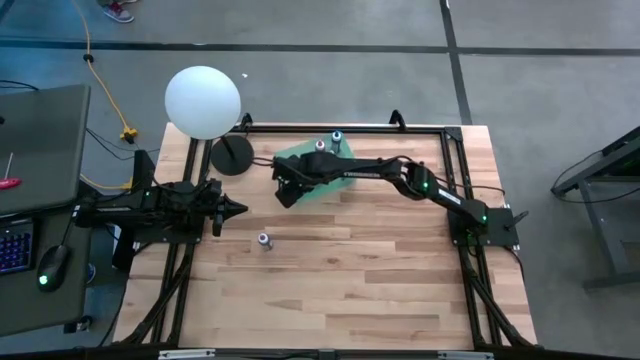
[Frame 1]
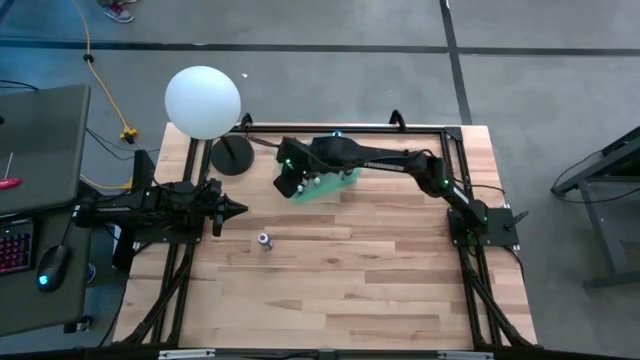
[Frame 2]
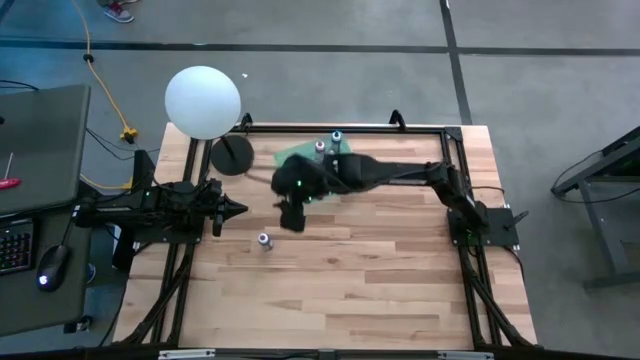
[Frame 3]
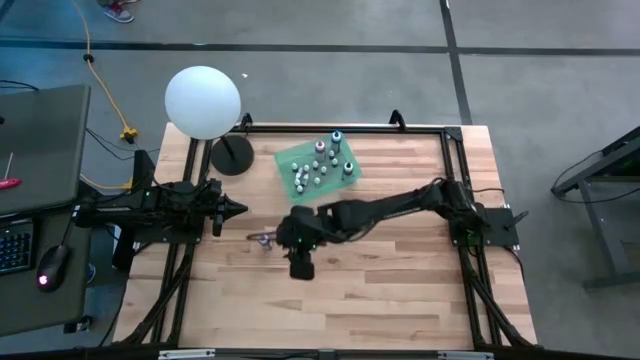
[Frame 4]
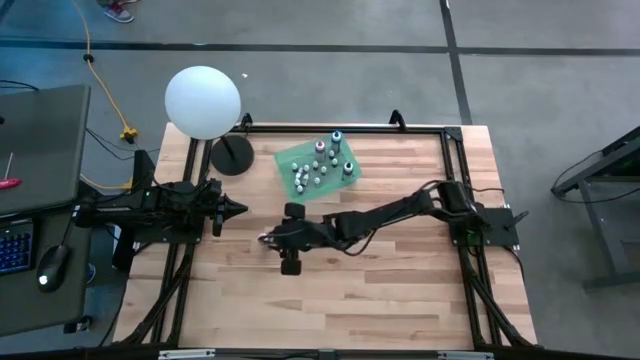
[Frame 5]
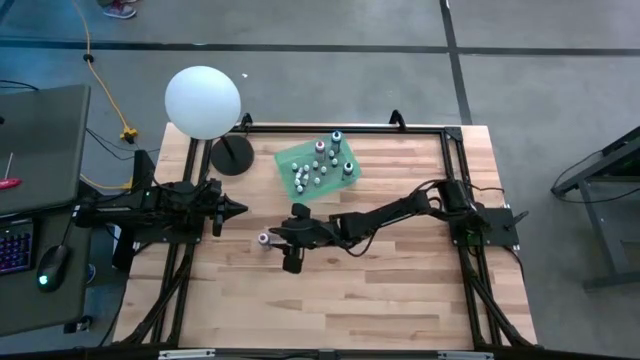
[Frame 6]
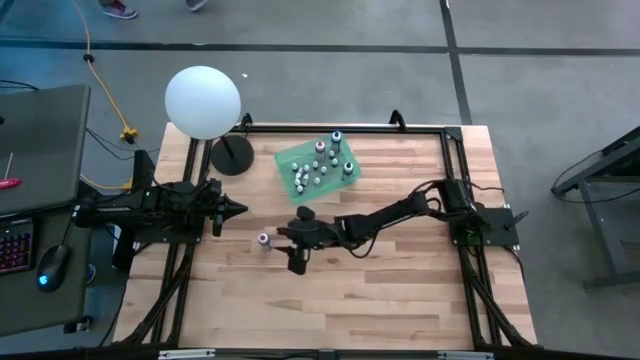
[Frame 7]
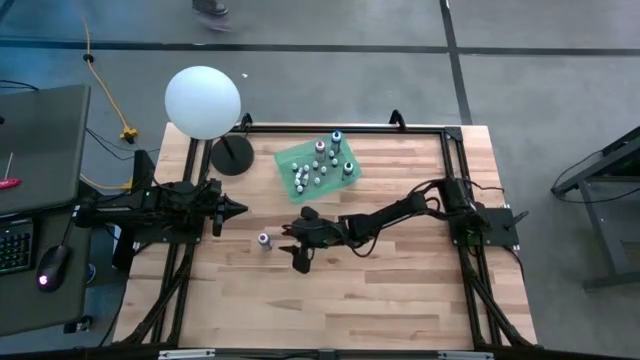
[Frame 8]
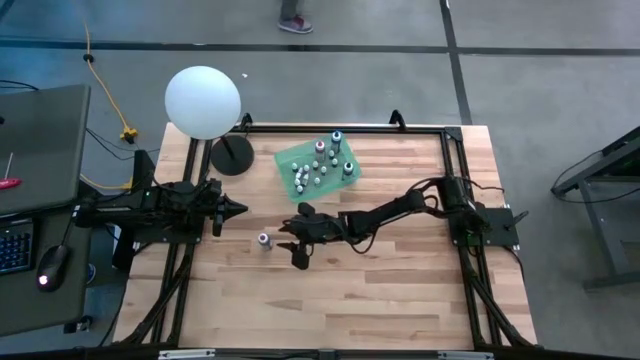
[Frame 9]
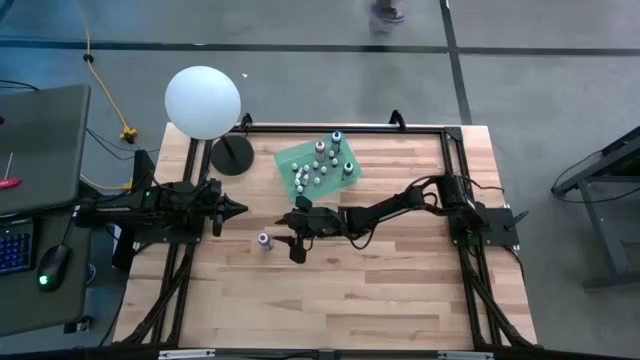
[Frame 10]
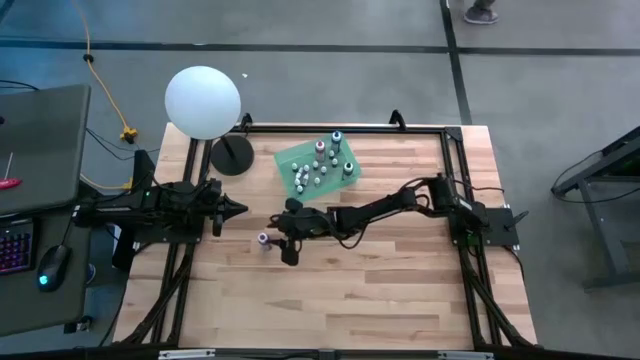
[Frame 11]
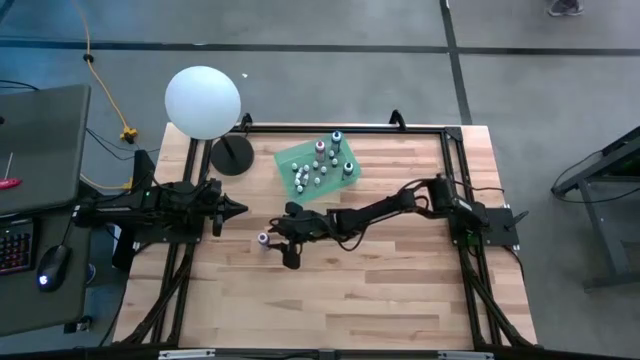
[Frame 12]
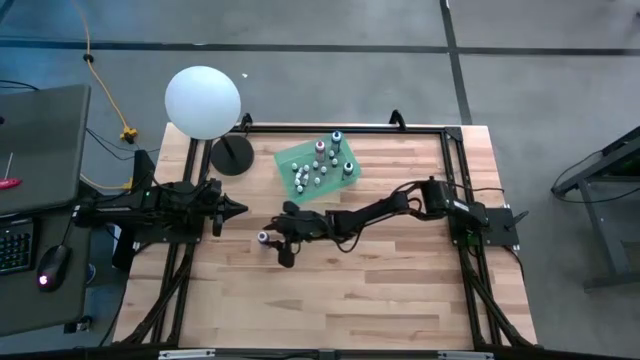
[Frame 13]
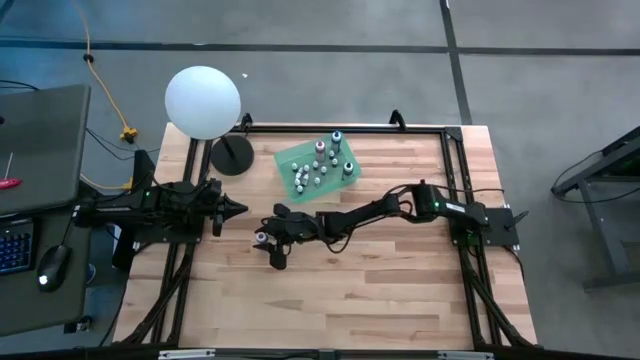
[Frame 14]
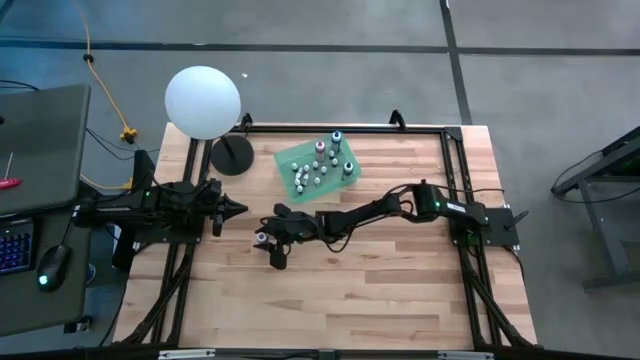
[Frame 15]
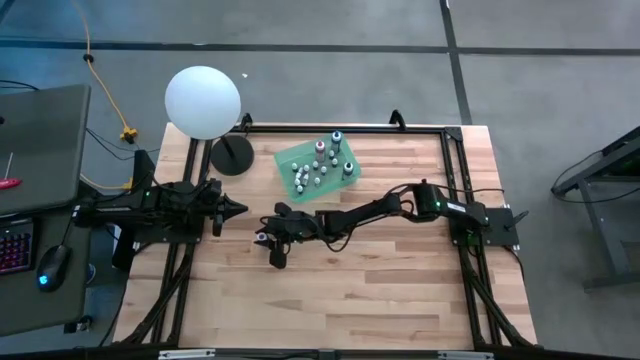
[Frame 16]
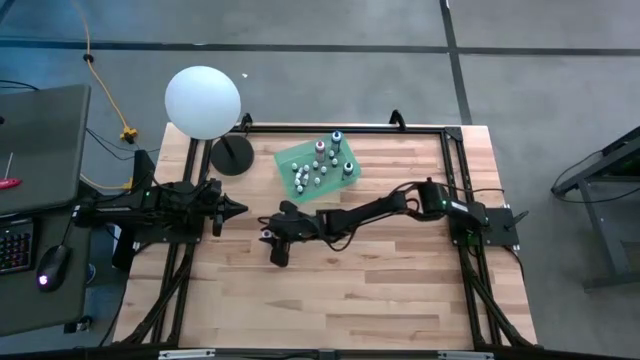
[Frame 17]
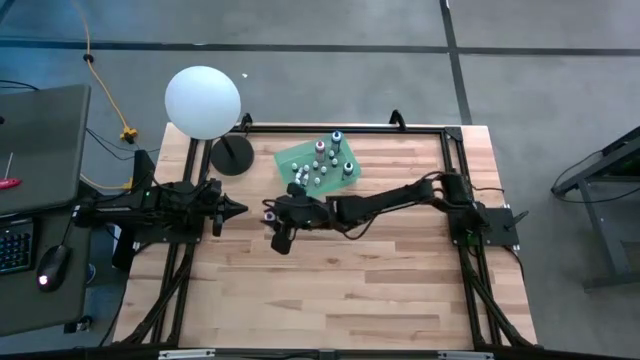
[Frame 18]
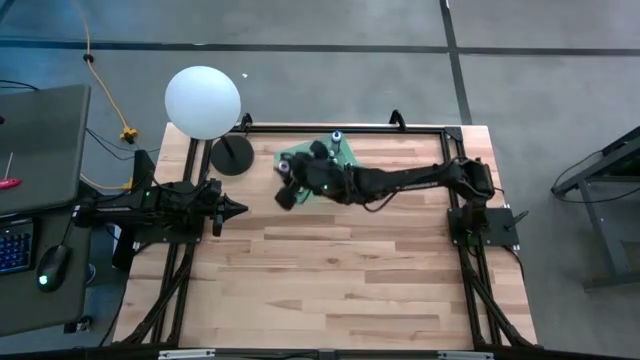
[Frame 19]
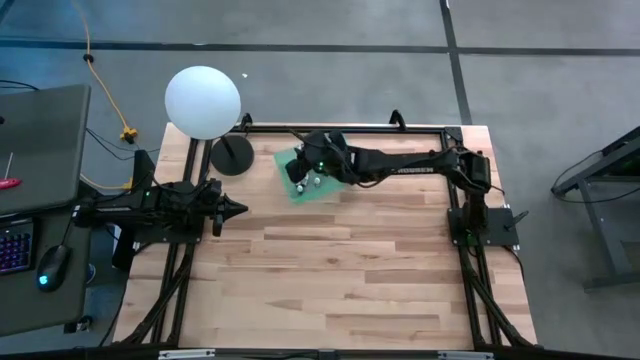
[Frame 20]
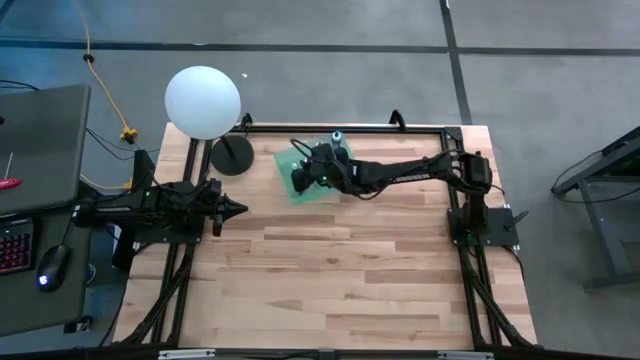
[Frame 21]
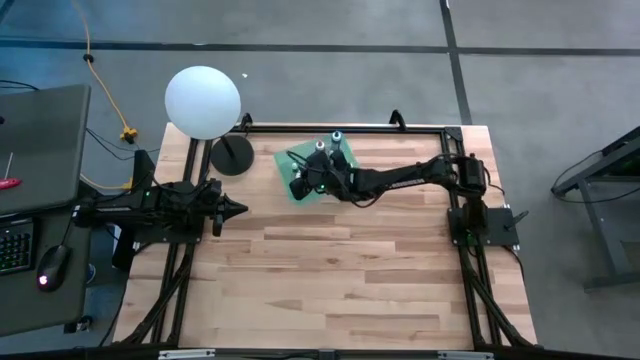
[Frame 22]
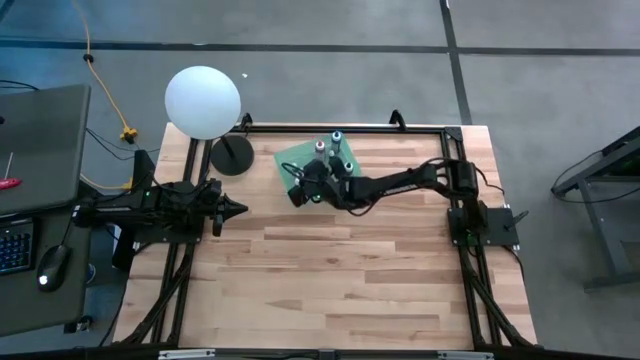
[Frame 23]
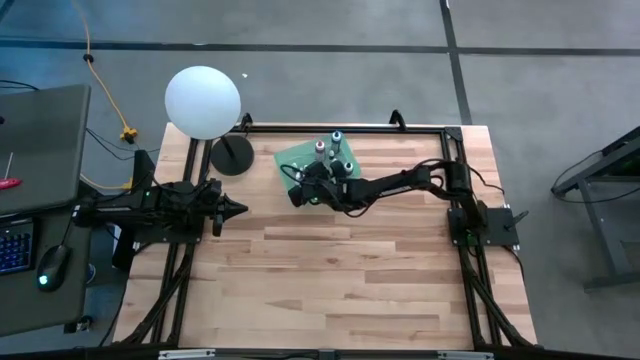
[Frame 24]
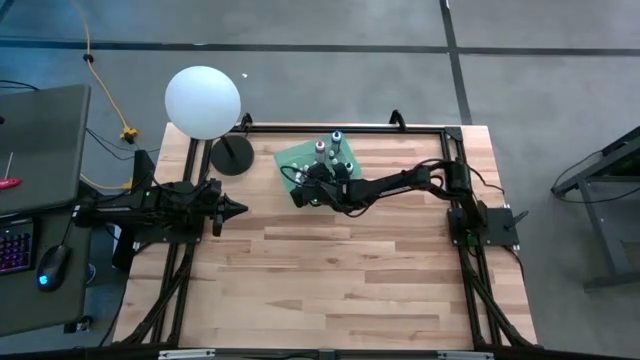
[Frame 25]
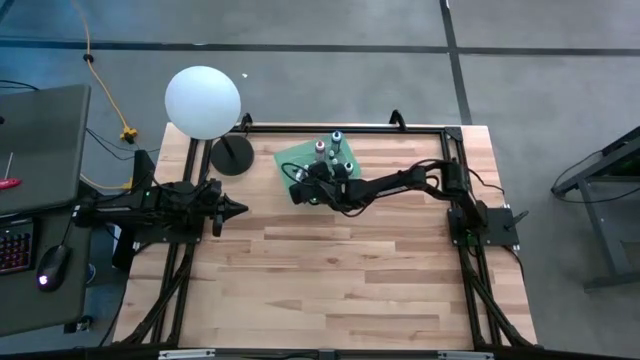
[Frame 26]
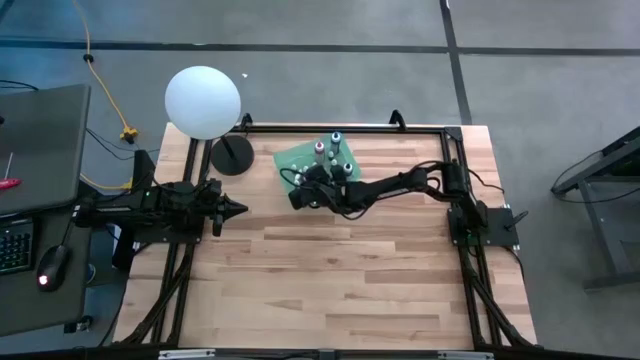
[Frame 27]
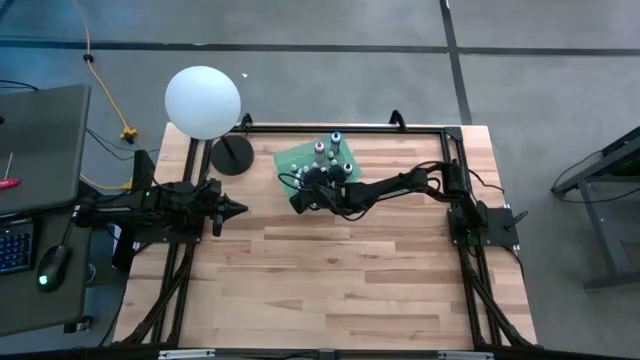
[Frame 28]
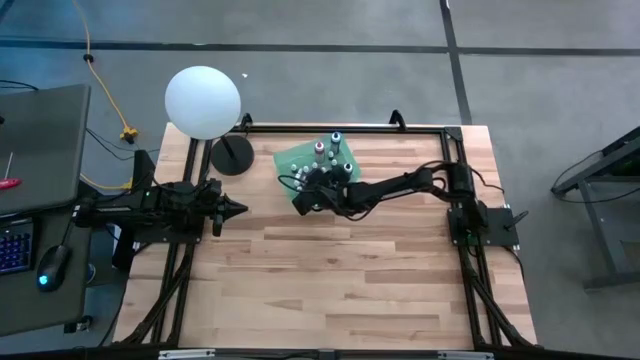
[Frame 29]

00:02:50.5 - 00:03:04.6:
Task: Pick & Place food coloring
Put the large purple dye bottles in the green bin

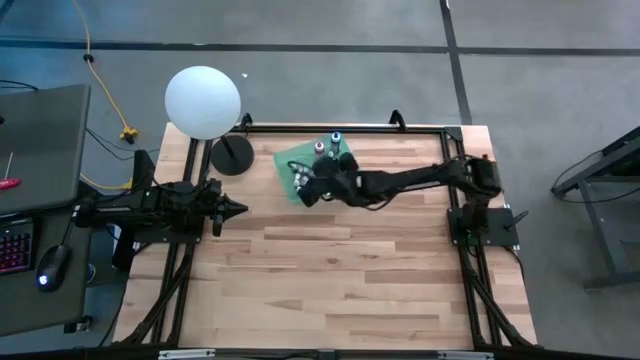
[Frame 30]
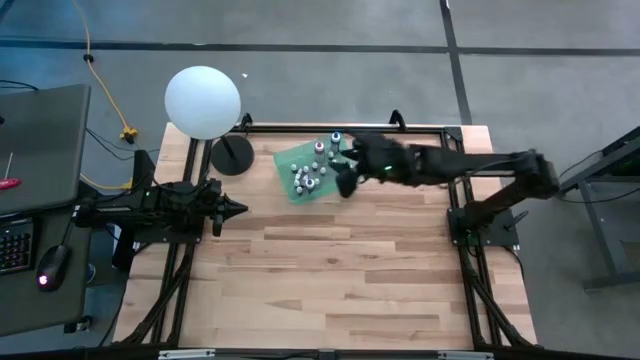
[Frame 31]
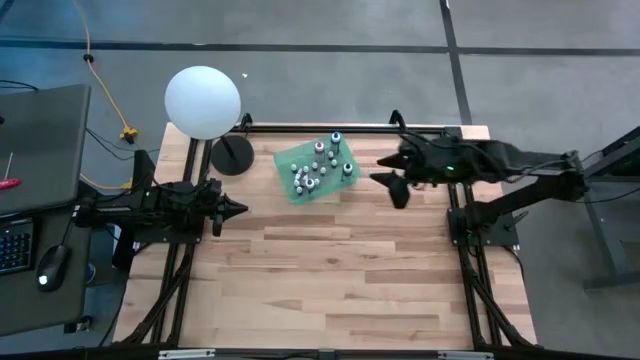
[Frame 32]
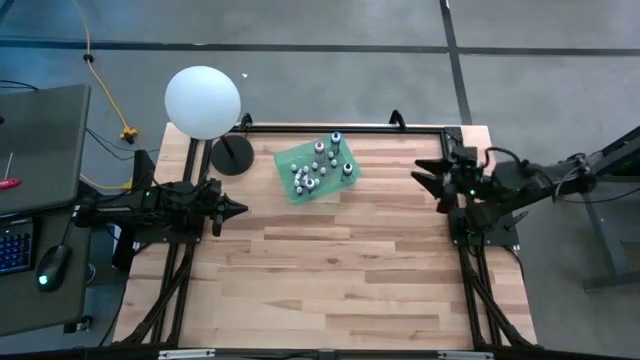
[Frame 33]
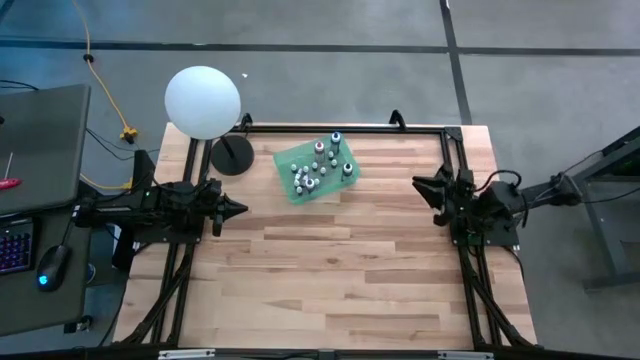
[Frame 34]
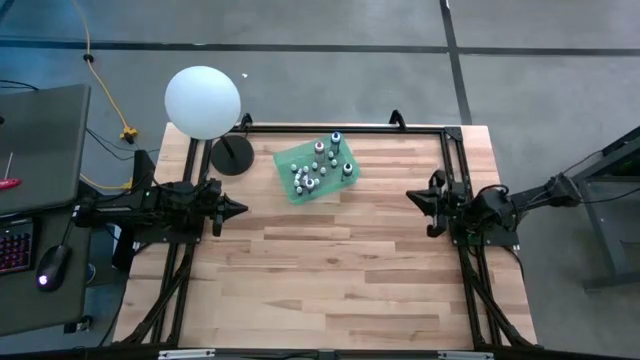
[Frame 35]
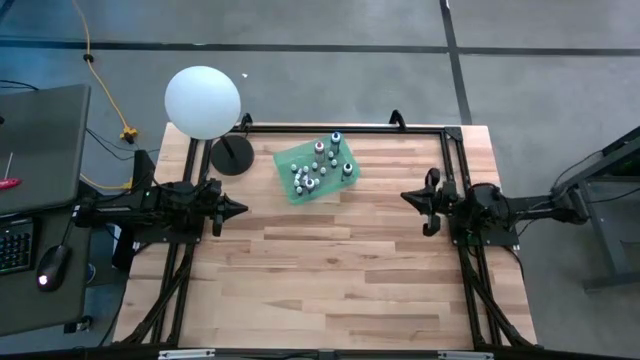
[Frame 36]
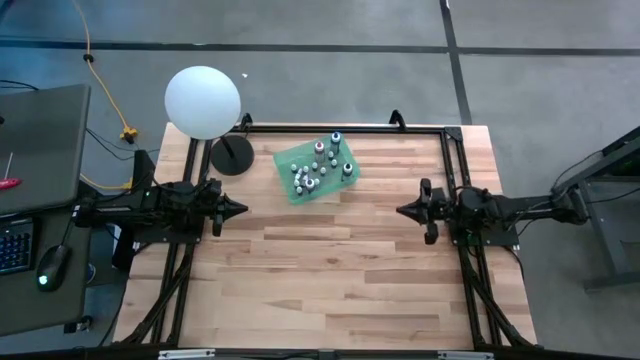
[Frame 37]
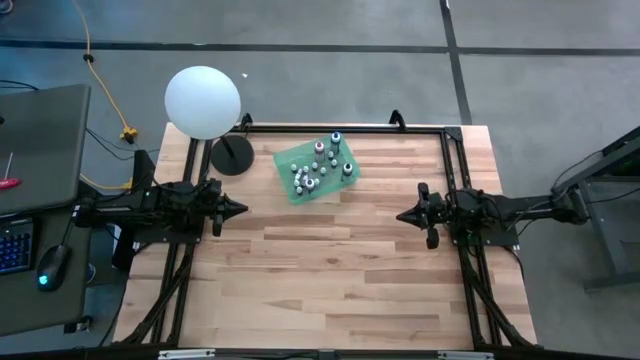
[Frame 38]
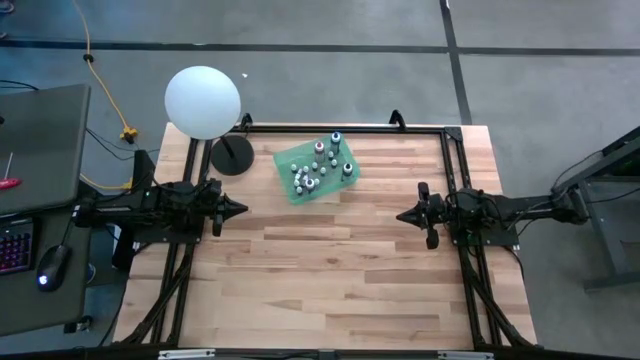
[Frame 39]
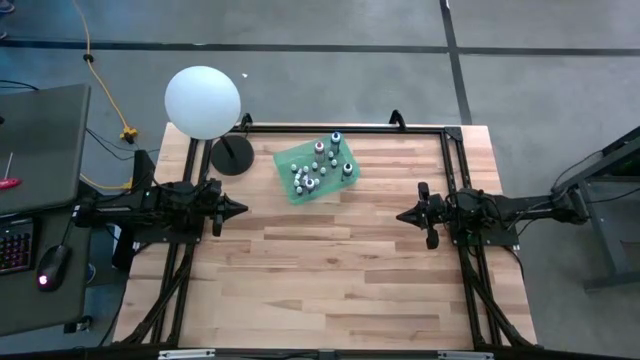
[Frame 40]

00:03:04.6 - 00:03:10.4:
Return to Home Position
